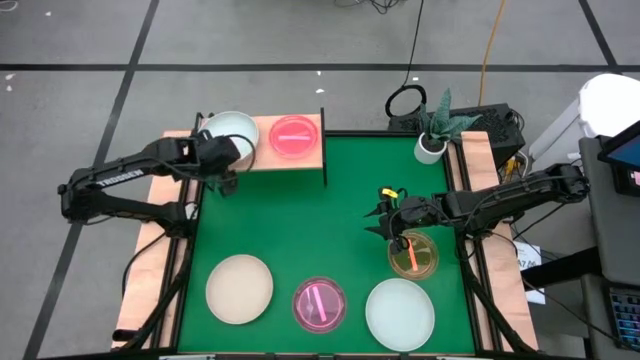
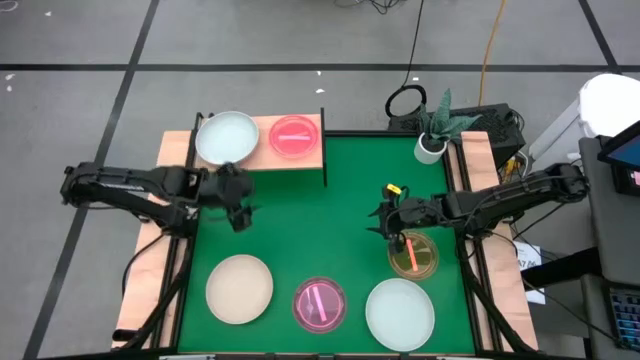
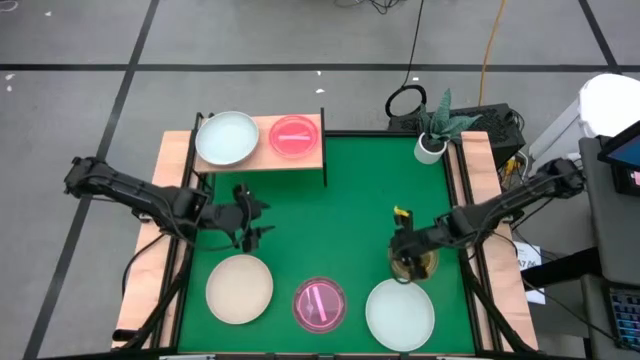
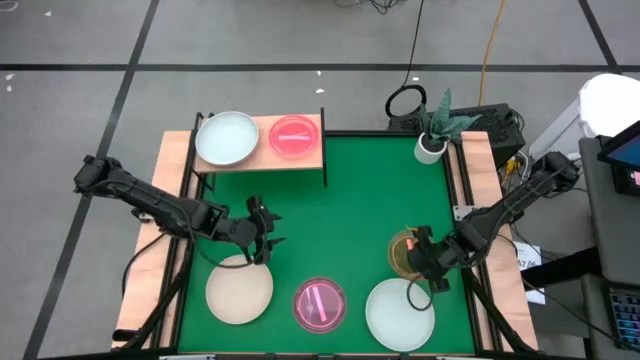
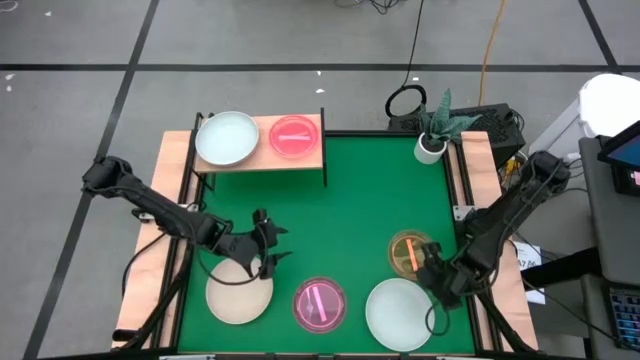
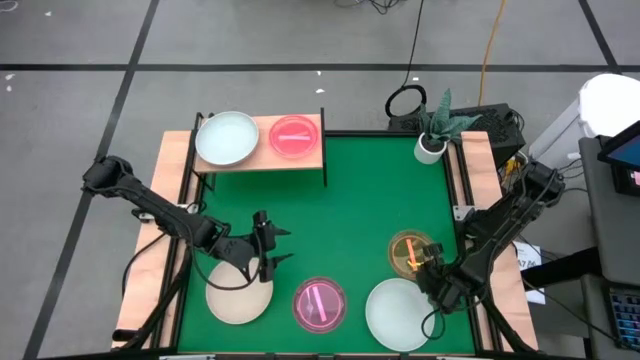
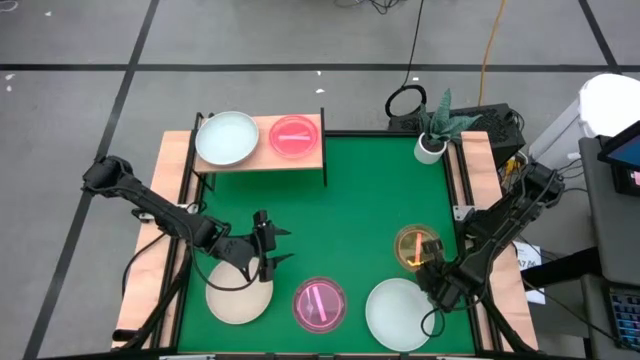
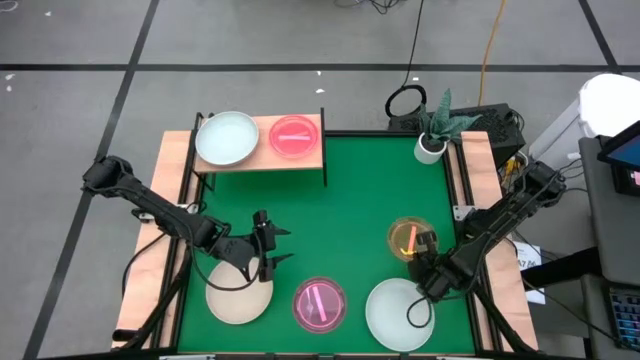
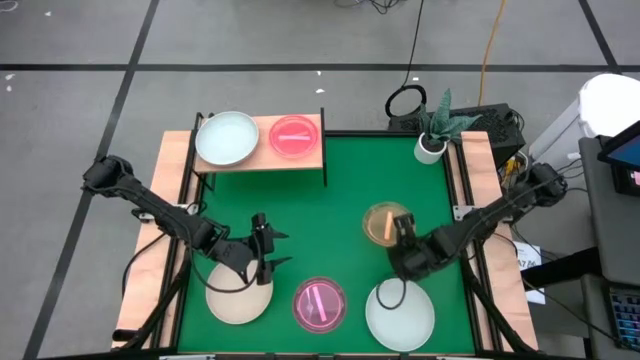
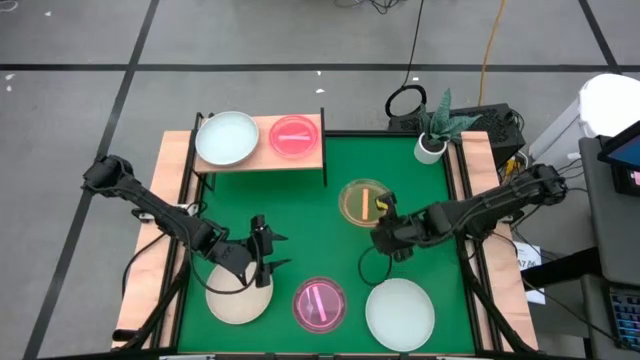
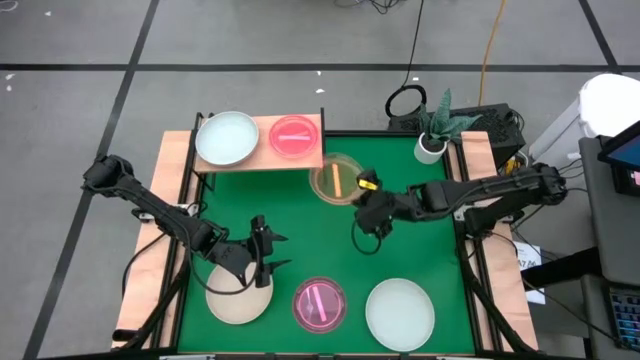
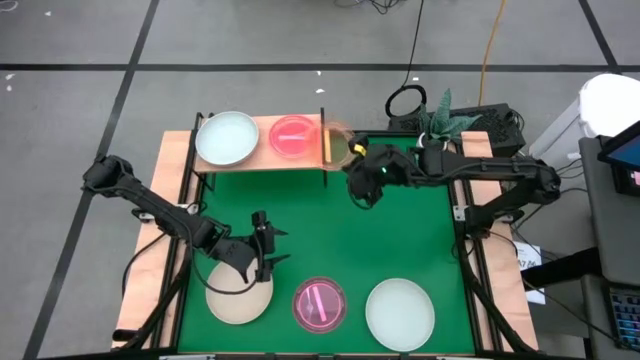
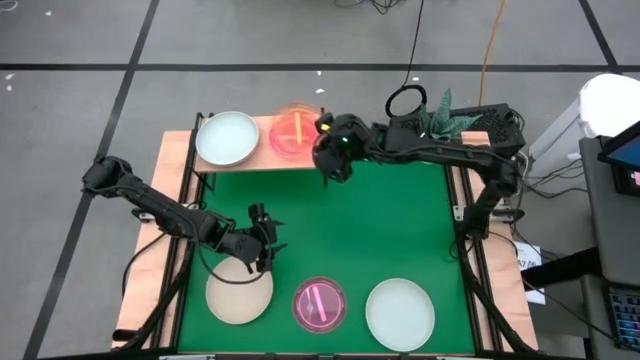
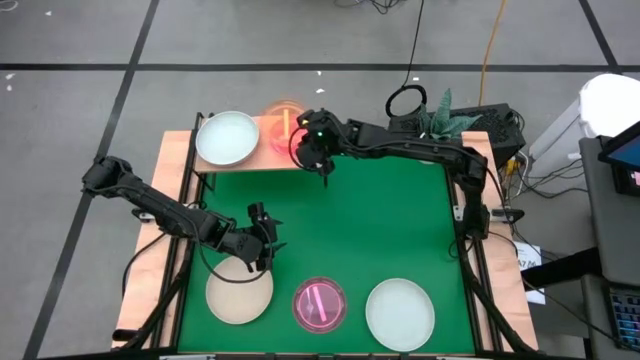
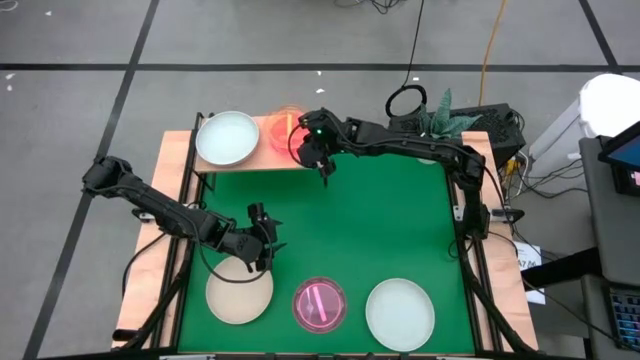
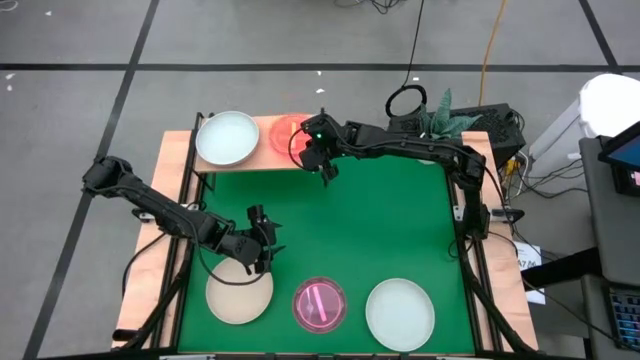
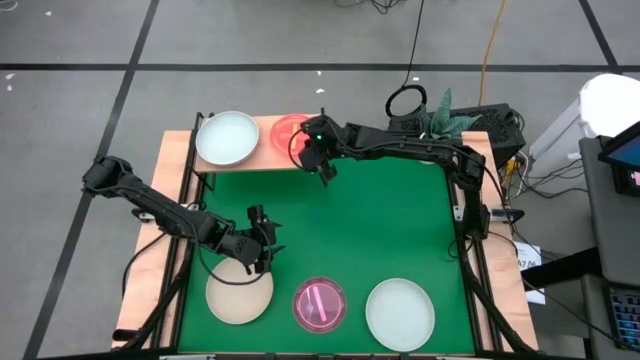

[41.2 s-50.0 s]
Task: Place and stack plates onto a shelf
Stack the orange plate on top of the pink plate on the shelf

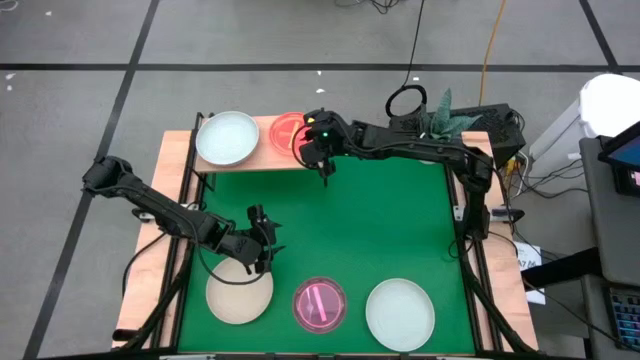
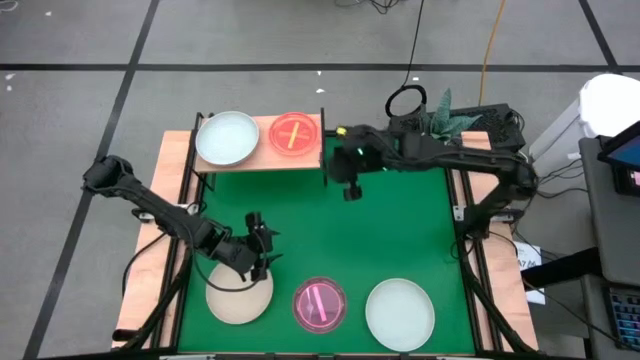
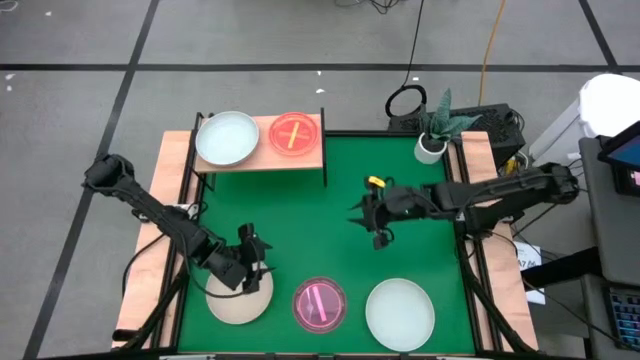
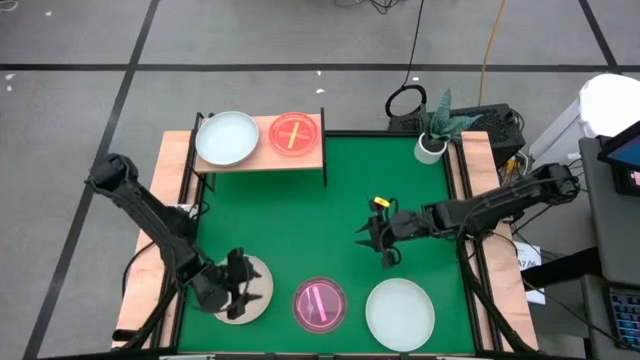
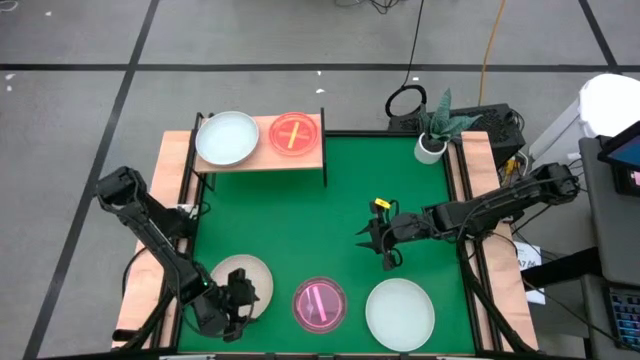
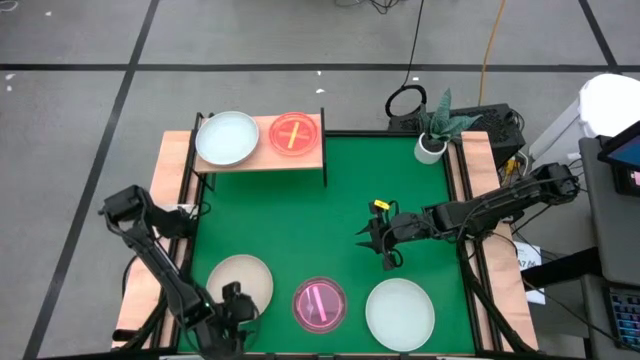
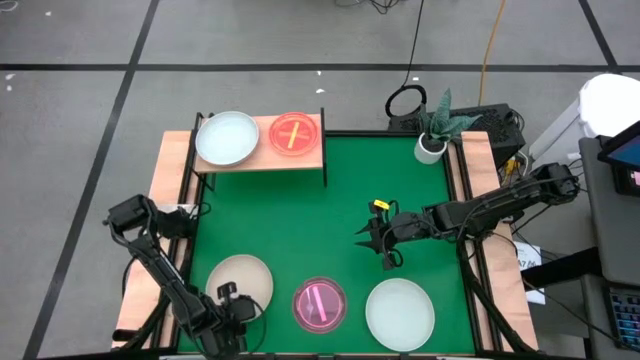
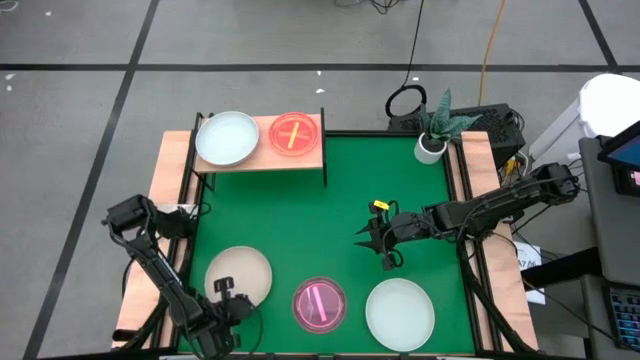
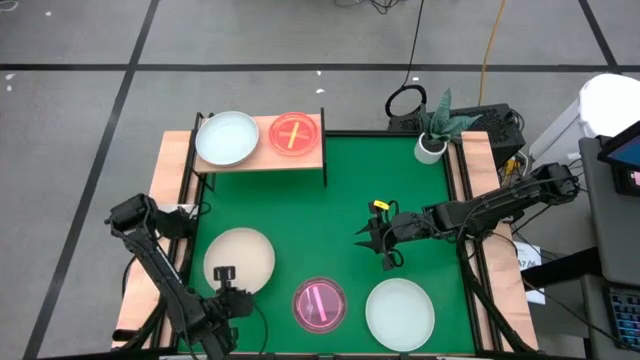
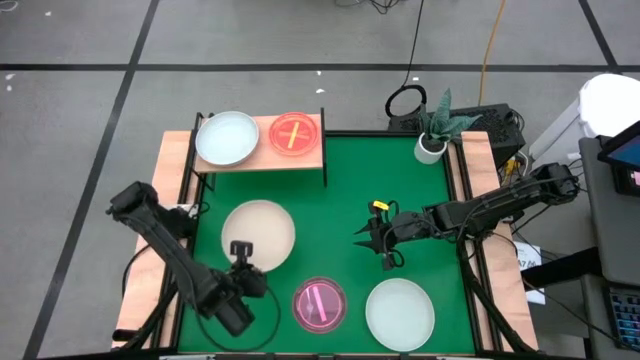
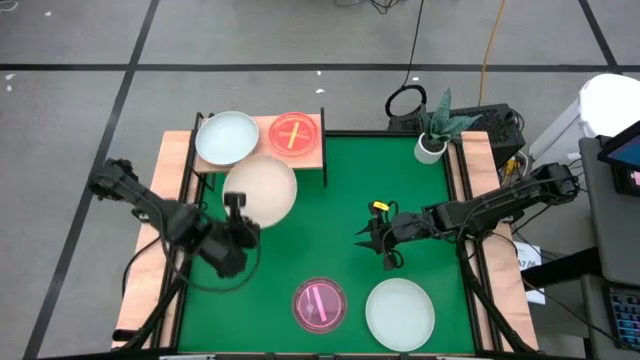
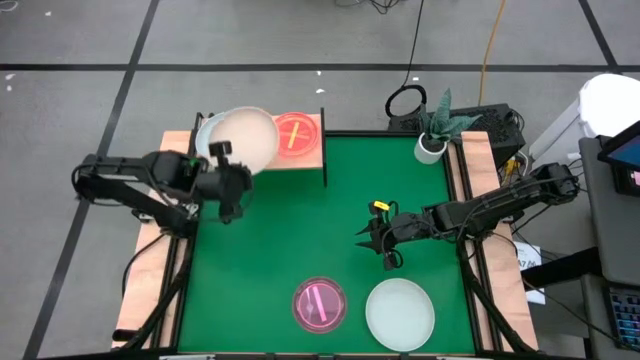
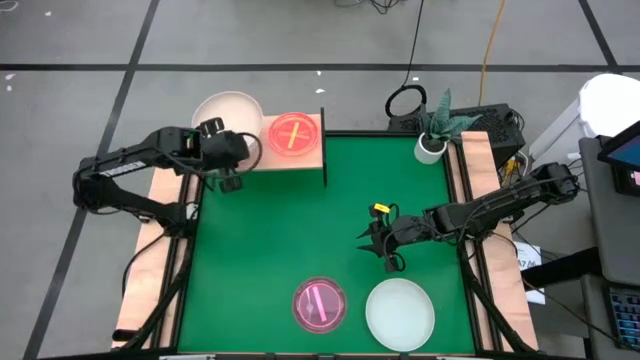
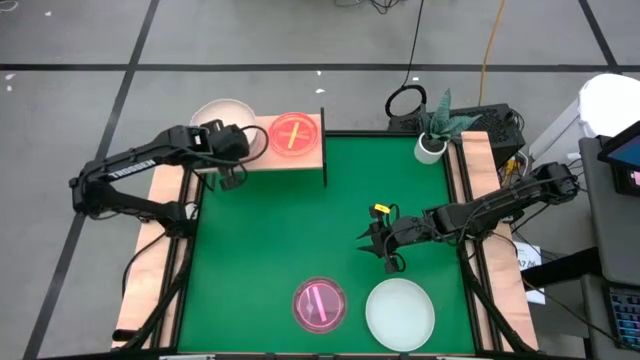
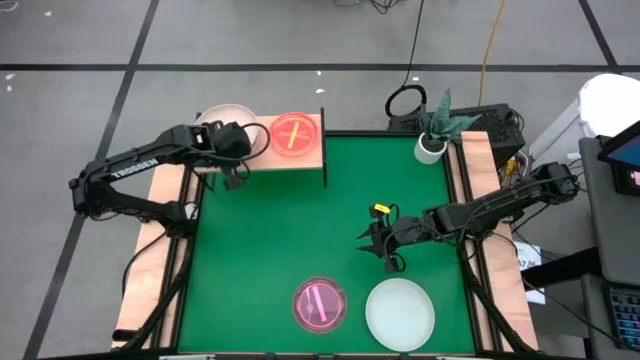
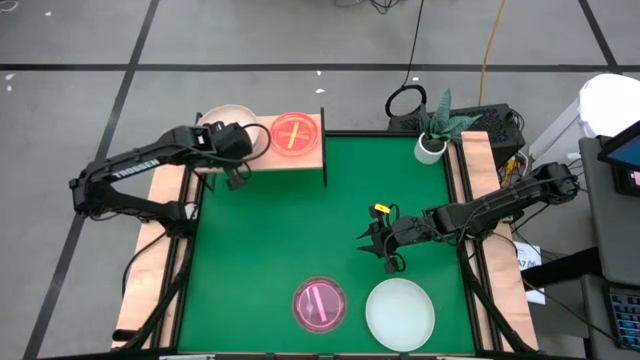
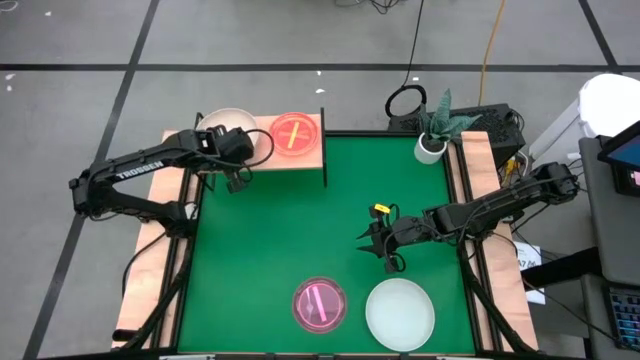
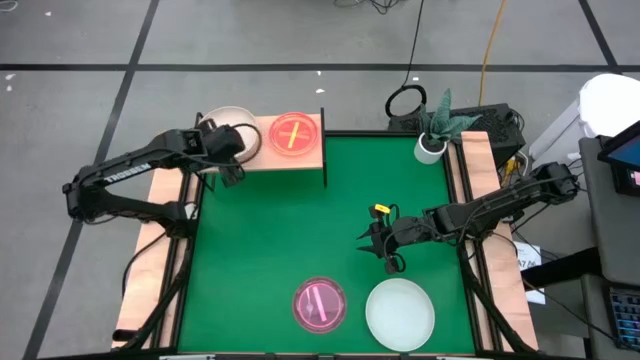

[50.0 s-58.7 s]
Stack the brown plate on top of the gray plate on the shelf

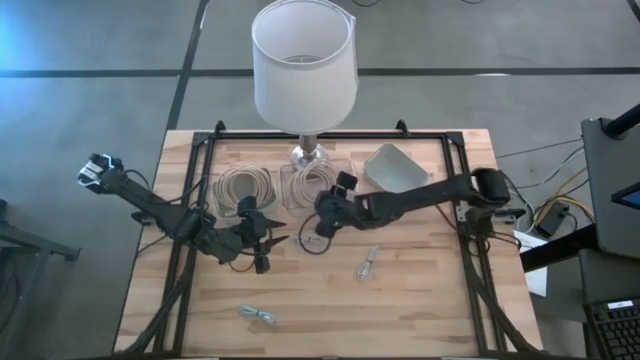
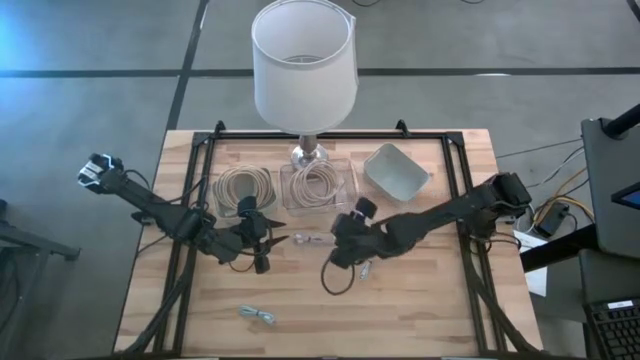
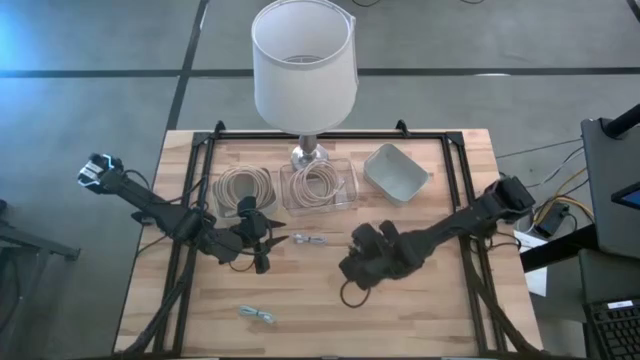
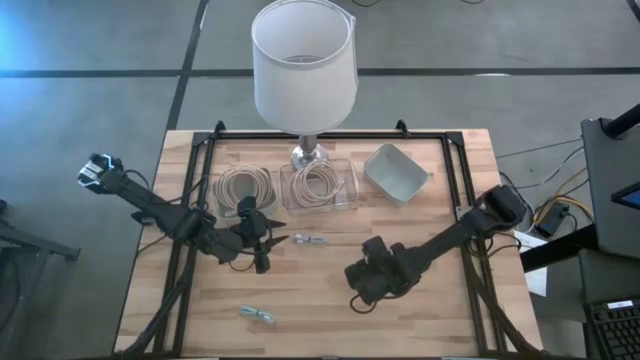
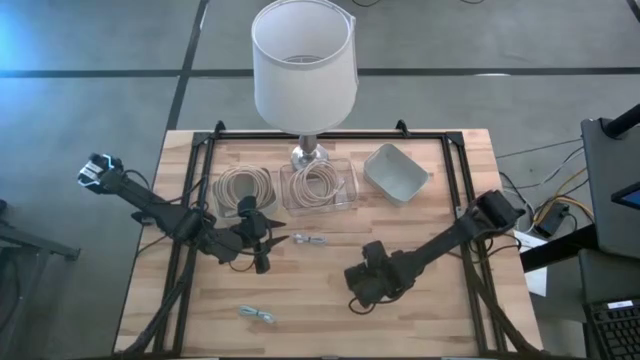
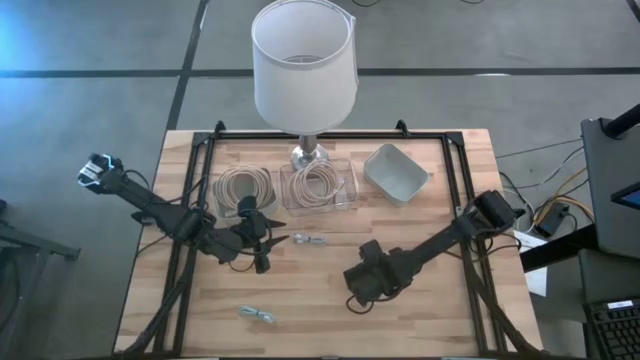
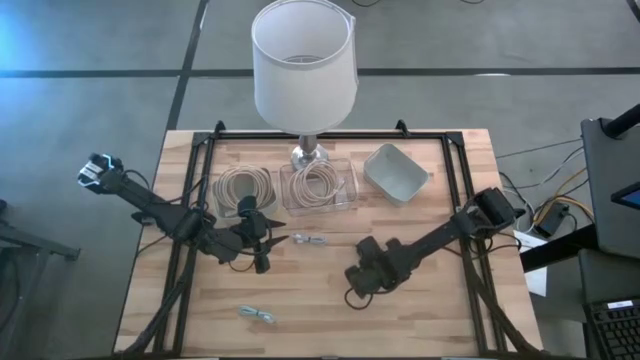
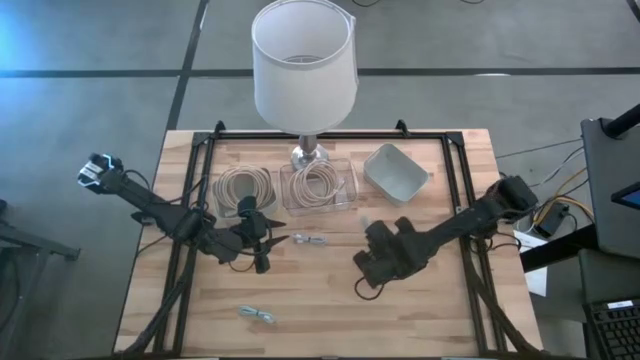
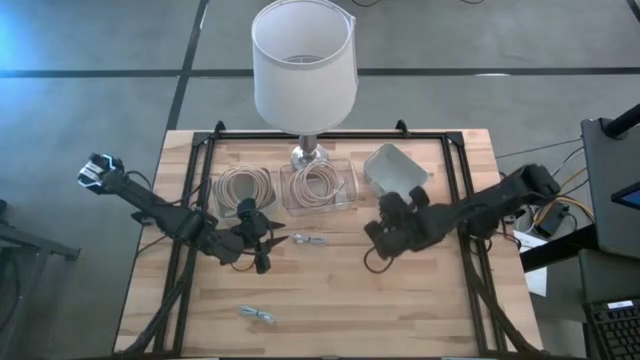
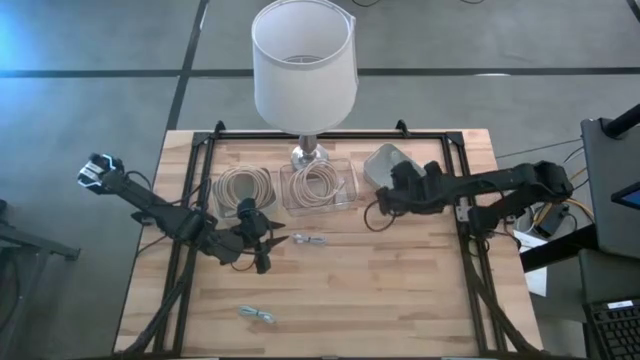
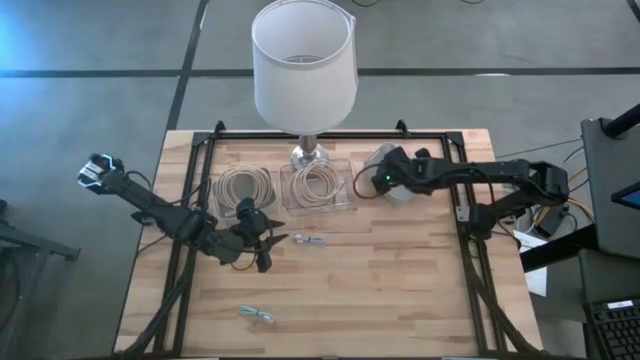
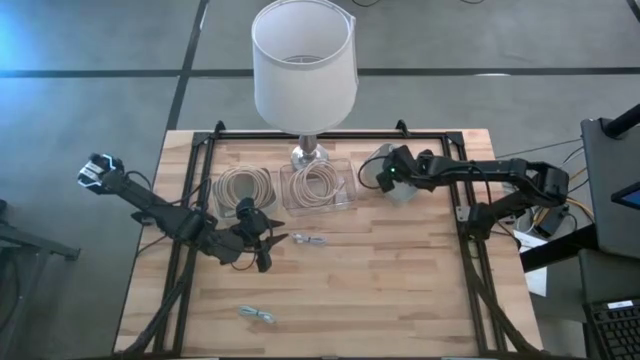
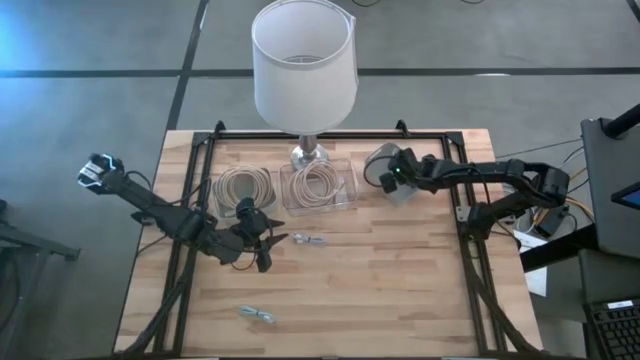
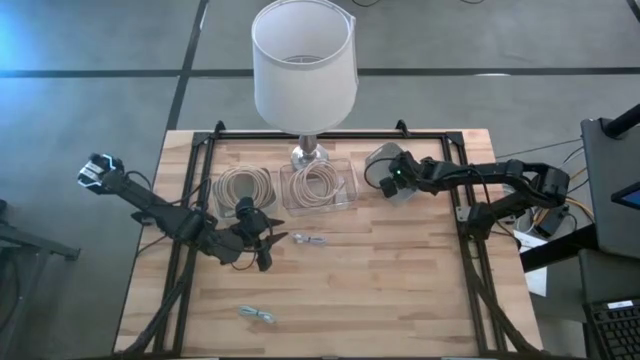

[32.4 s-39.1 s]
Task: Pick & Place USB Port
Put the white charger cable into the right gray bin
